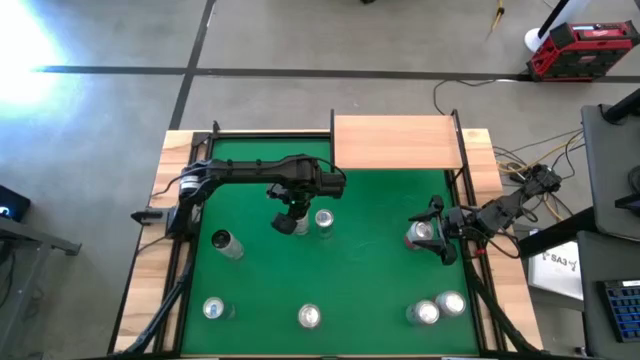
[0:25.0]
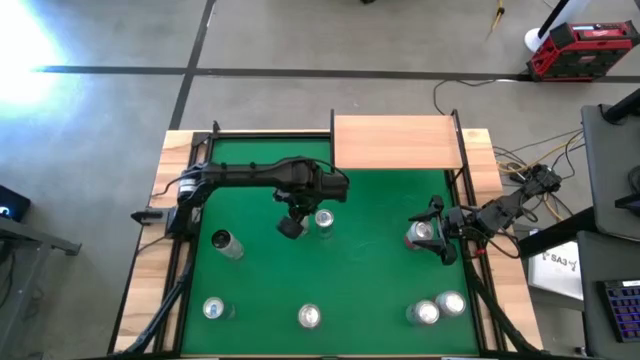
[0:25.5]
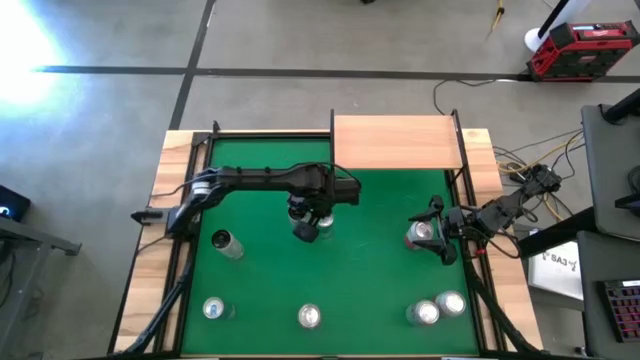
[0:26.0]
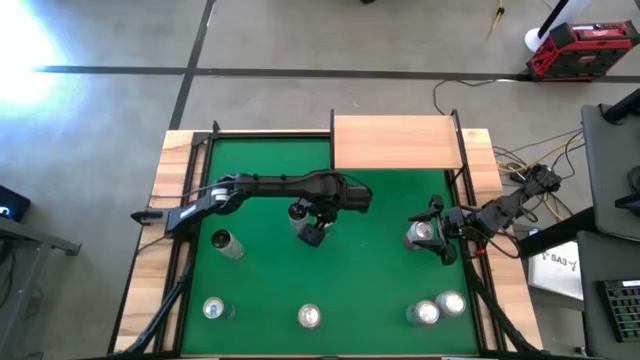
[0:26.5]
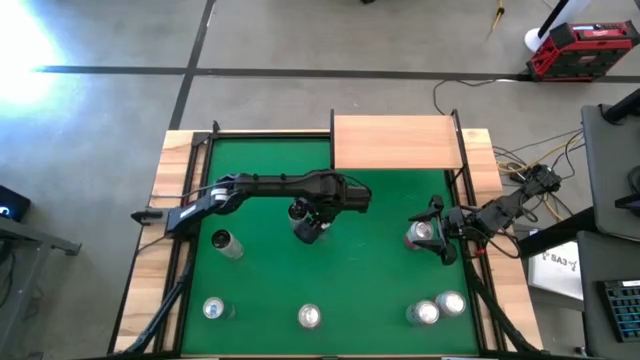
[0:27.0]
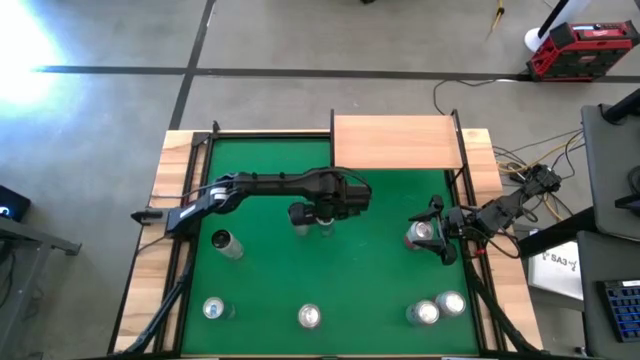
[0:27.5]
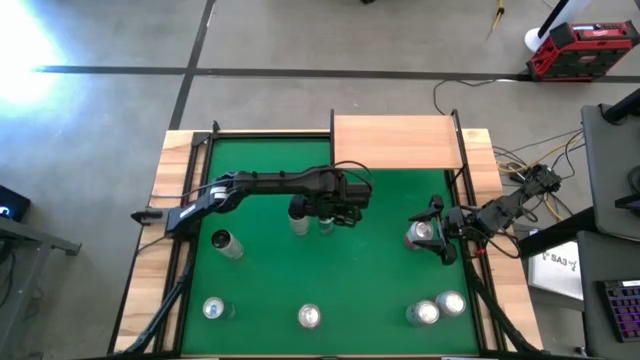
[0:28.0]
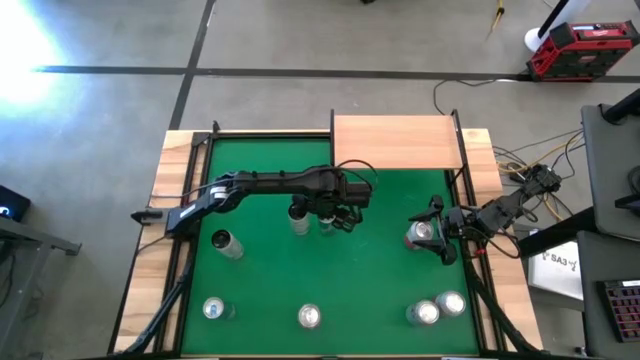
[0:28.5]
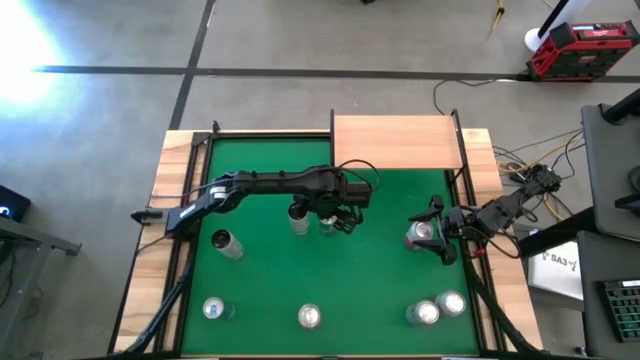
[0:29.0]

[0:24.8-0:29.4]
Task: Place canned beverage on shelf
Adjust the top blue soda can

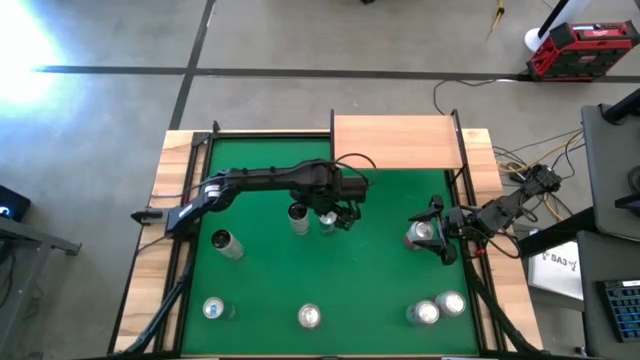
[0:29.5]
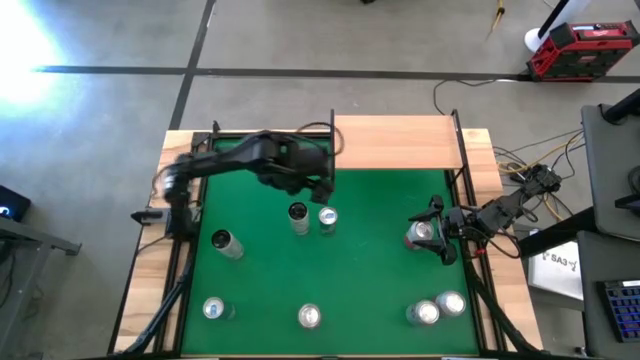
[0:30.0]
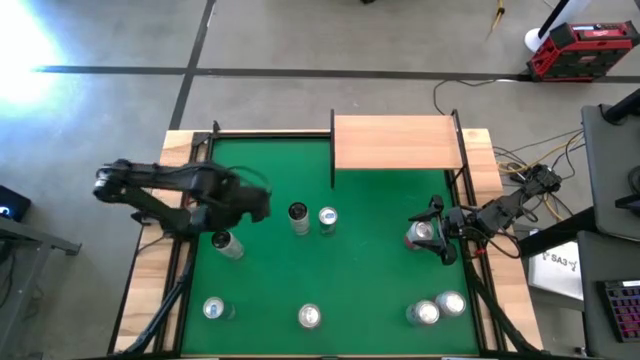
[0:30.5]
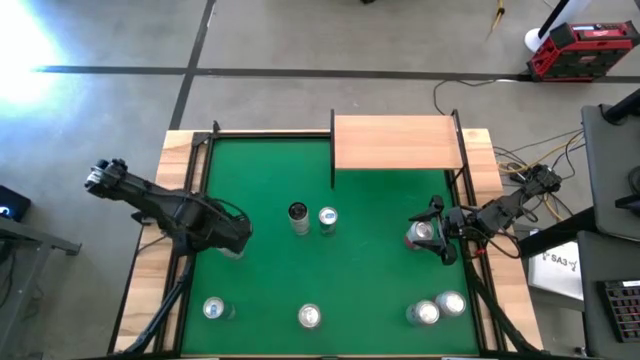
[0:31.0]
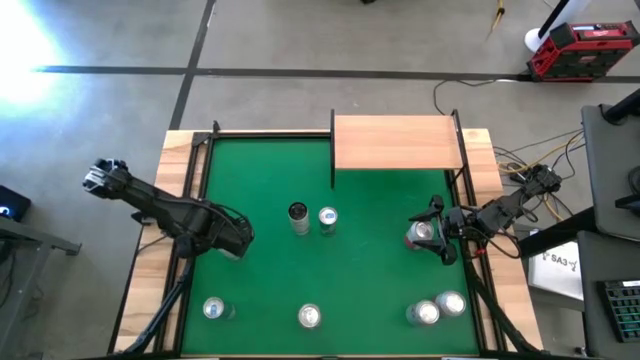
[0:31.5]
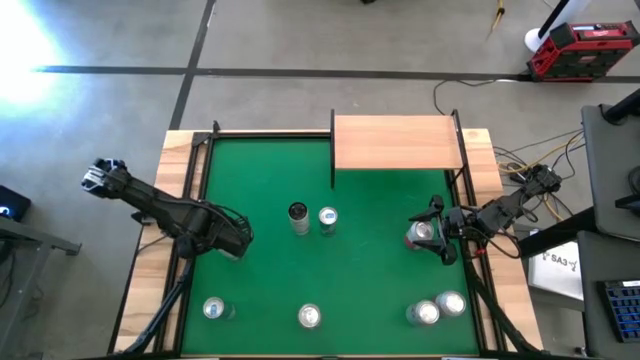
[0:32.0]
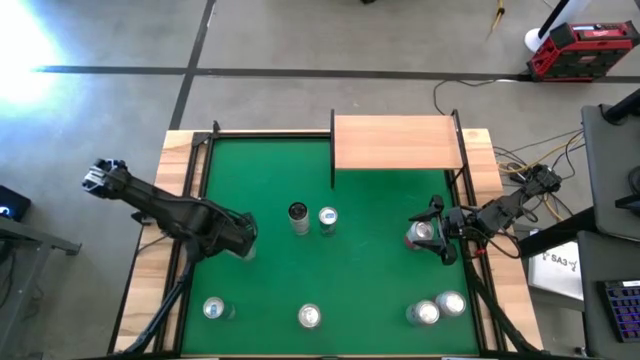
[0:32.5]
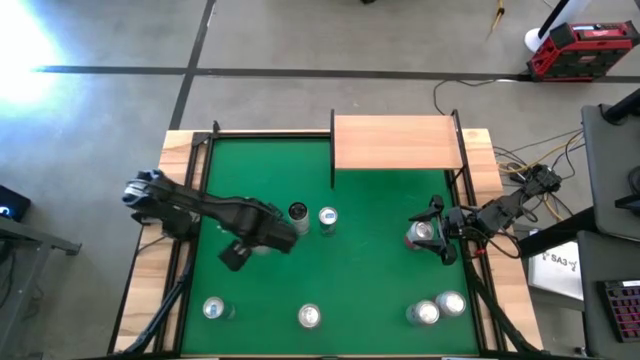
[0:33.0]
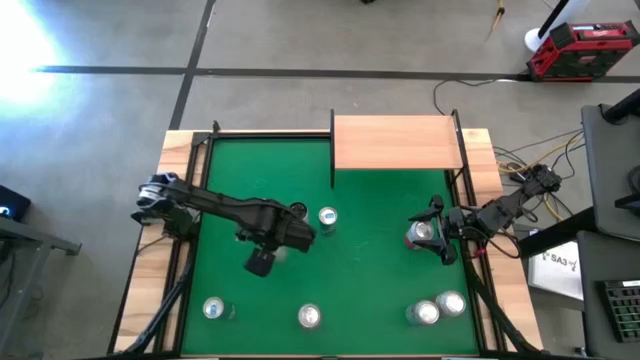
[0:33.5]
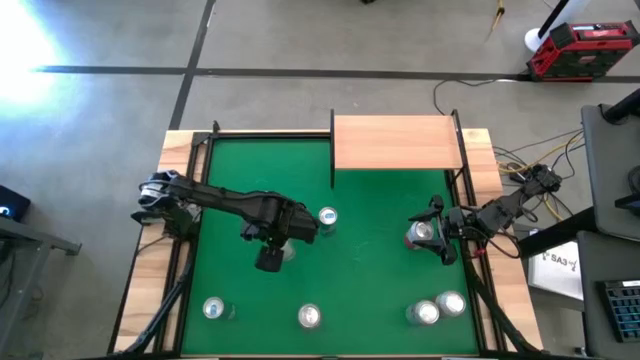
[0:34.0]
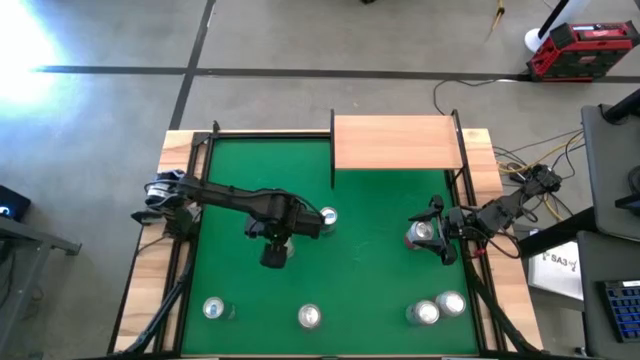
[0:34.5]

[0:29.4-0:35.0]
Move the bottom white-yellow soda can to the center of the table

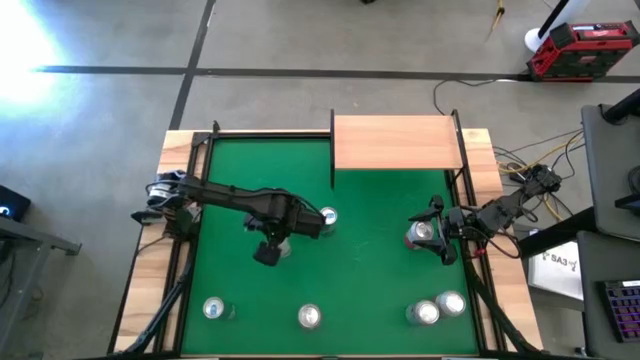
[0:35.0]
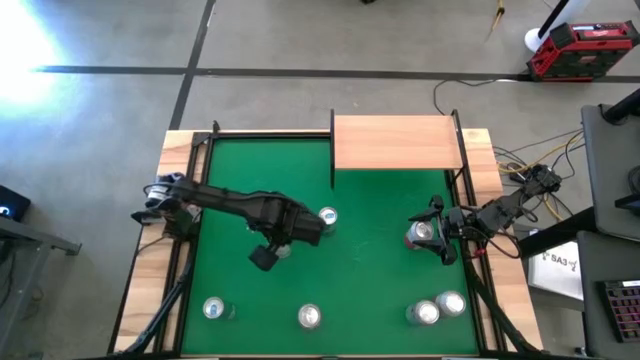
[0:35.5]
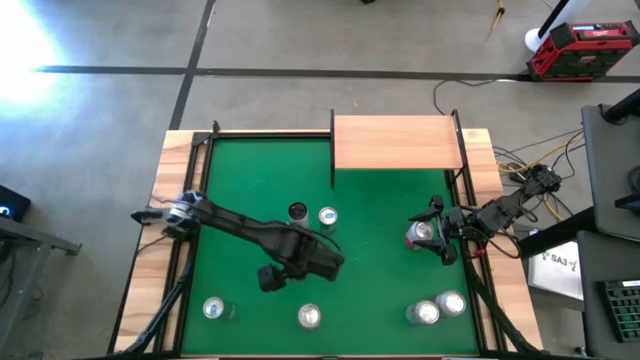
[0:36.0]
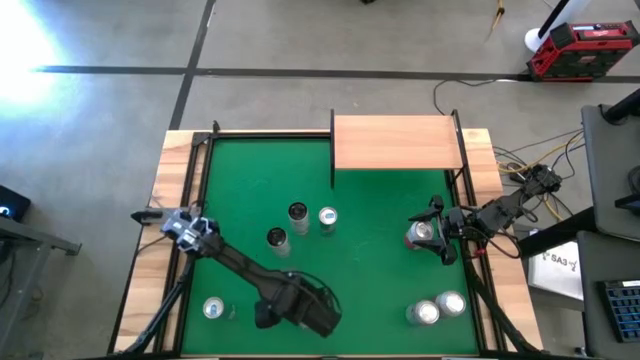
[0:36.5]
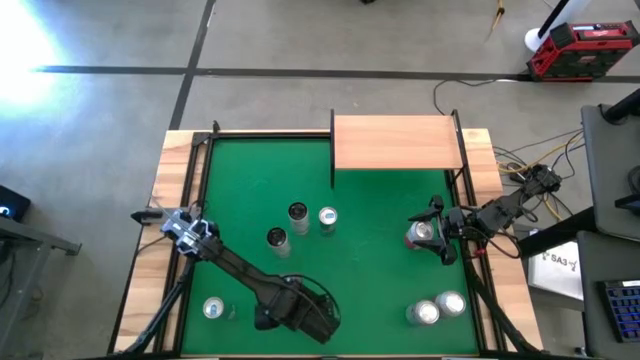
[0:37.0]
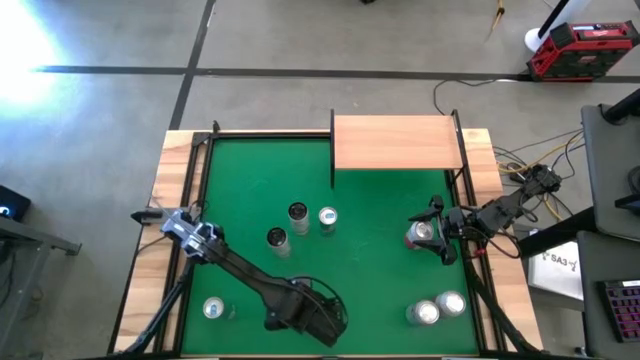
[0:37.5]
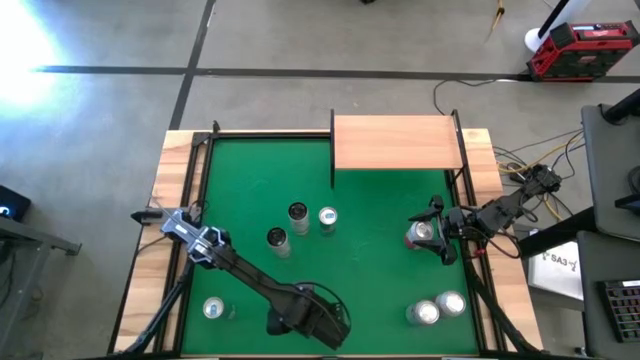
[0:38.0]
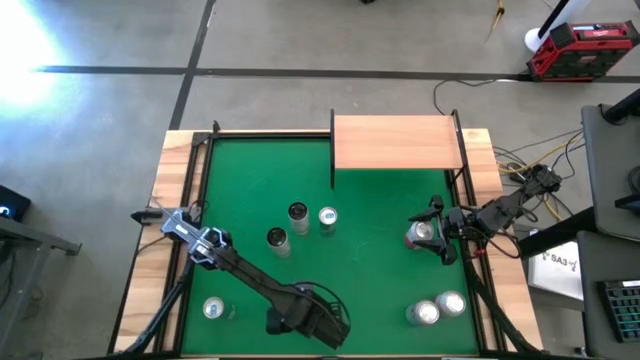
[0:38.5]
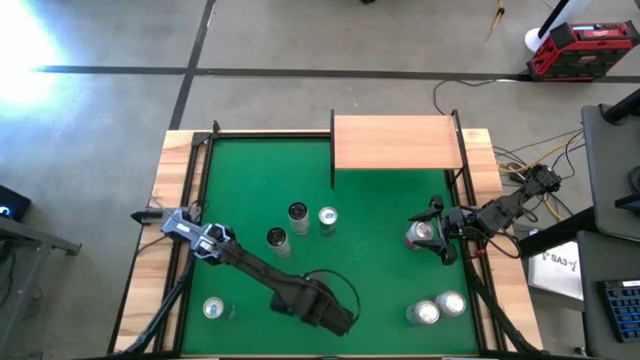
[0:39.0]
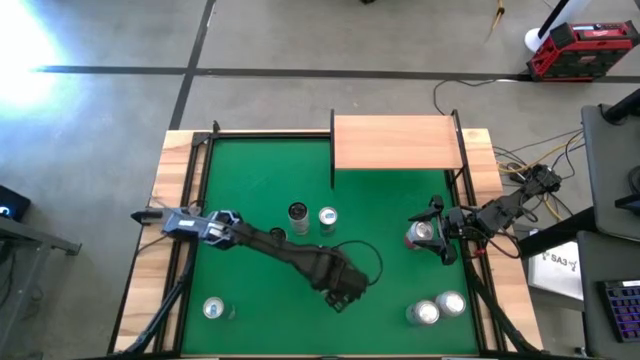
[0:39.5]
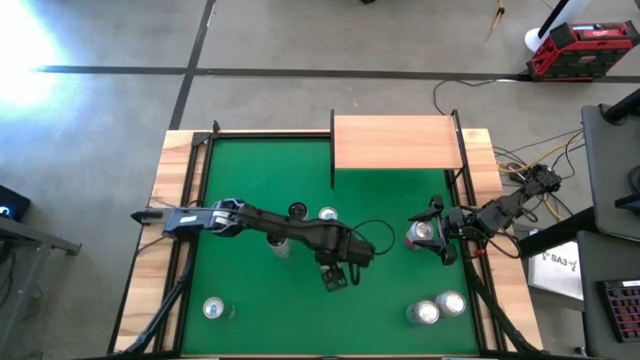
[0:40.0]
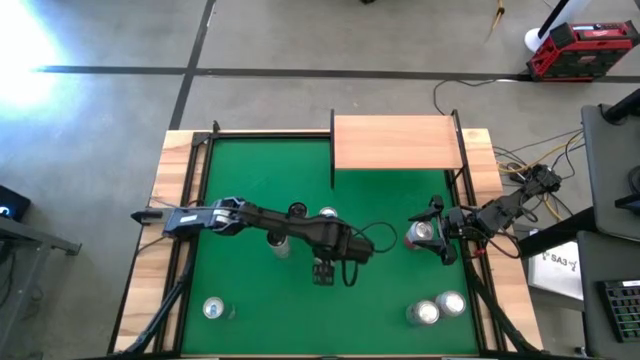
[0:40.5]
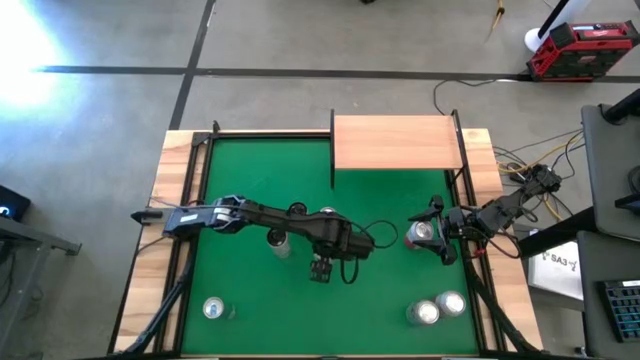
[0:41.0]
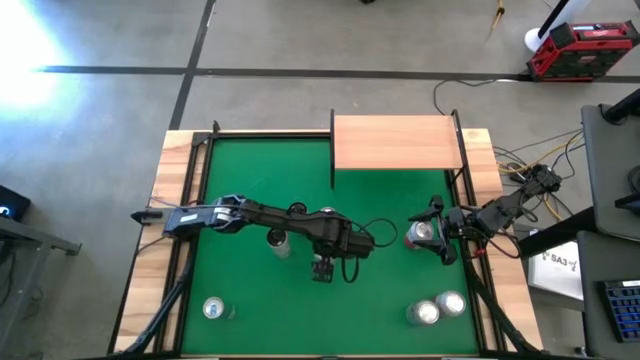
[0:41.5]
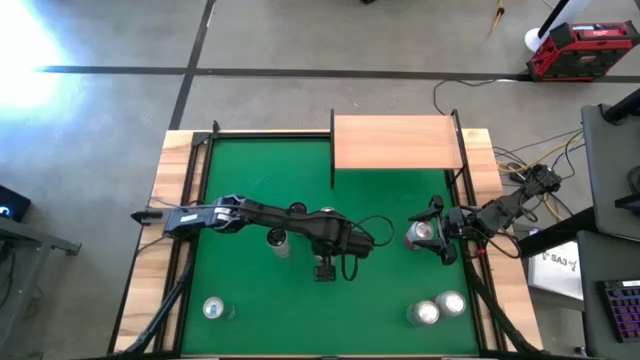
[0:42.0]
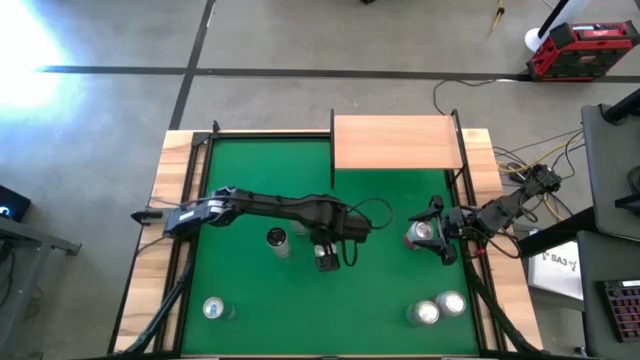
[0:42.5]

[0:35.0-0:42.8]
Move the left red-silver soda can to the center of the table

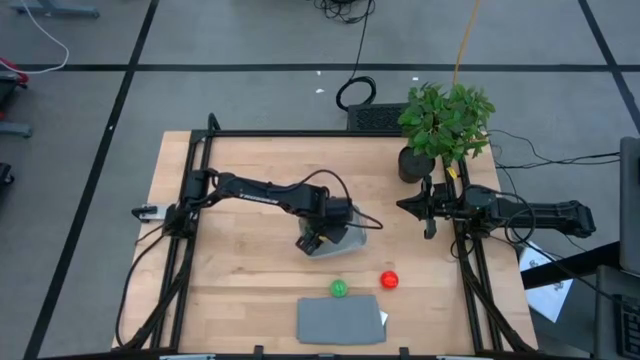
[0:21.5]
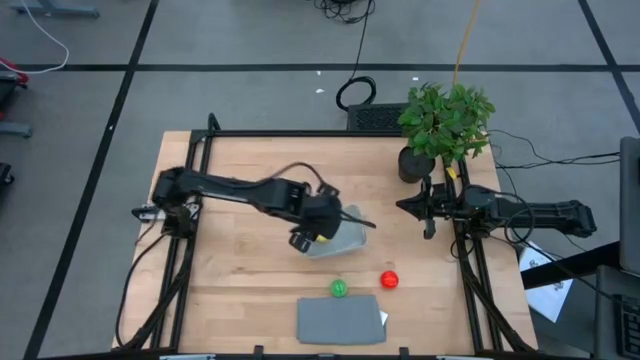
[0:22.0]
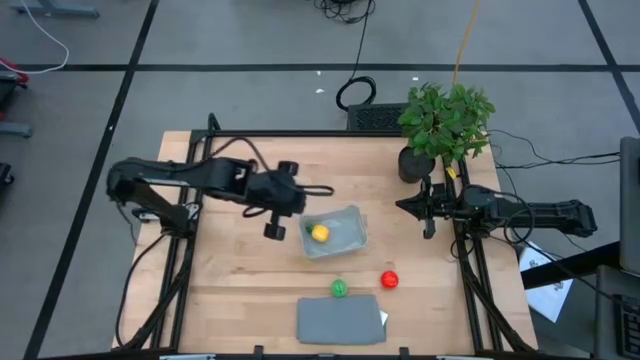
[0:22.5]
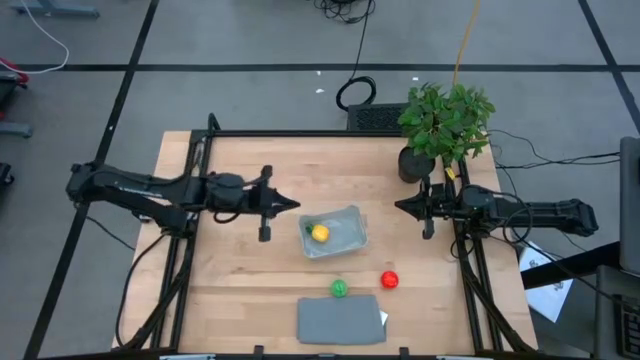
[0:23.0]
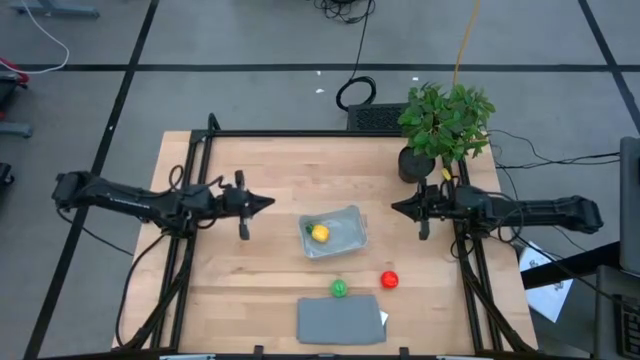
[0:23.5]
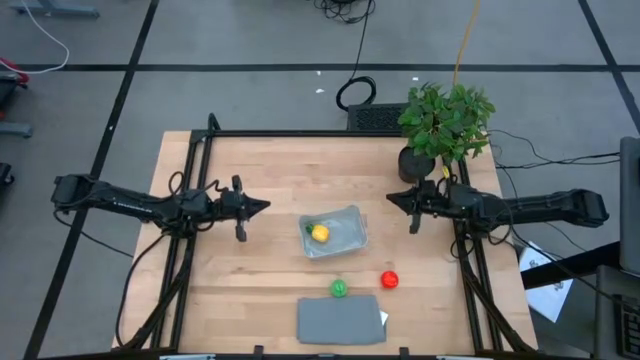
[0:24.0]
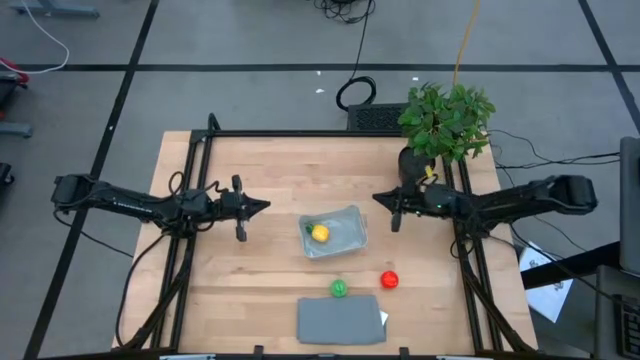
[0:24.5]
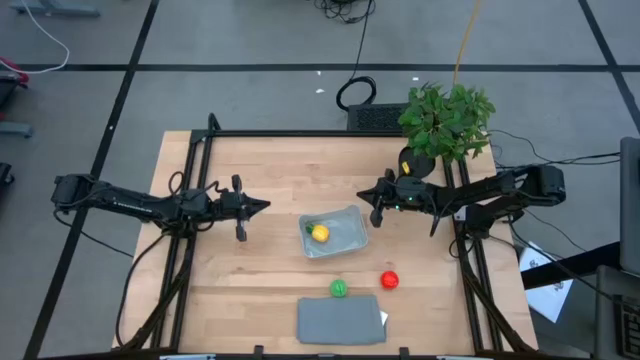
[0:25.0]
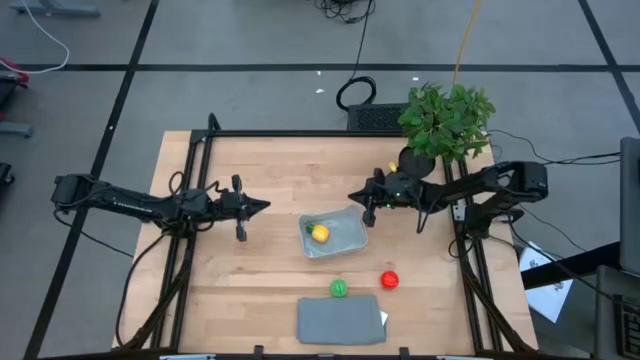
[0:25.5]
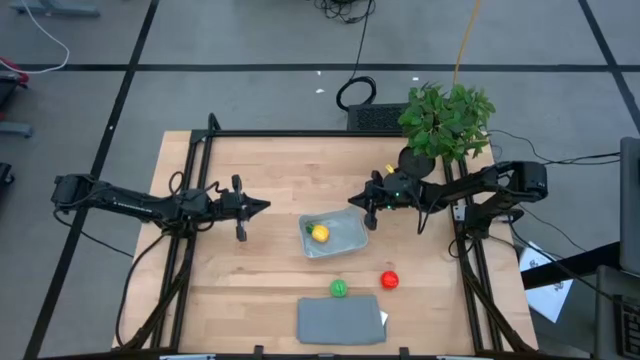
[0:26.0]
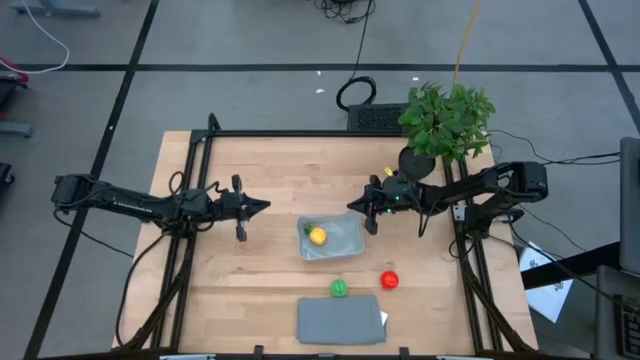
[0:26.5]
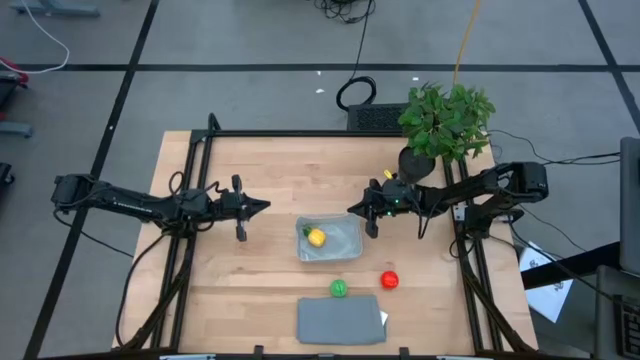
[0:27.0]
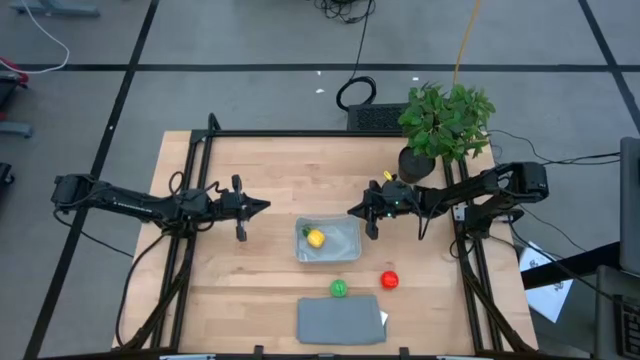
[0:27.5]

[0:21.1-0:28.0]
Task: Pick and placing Produce into tupperware
Adjust the gray bin on the table
